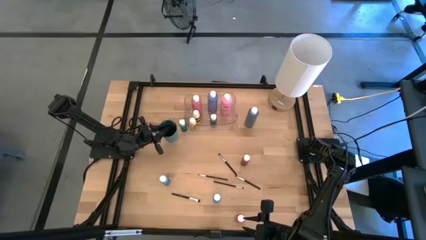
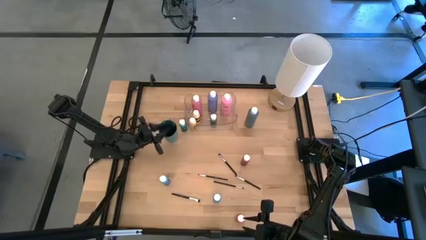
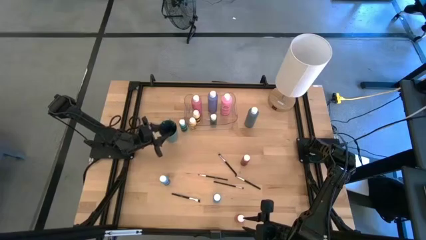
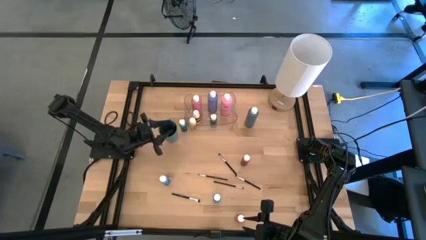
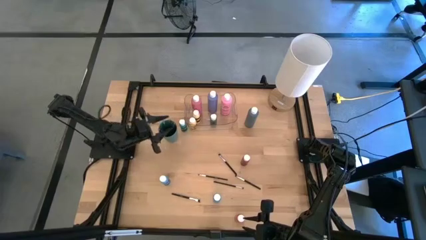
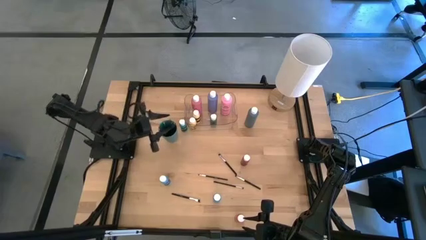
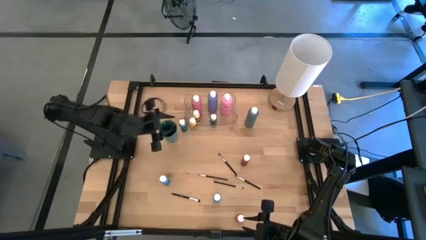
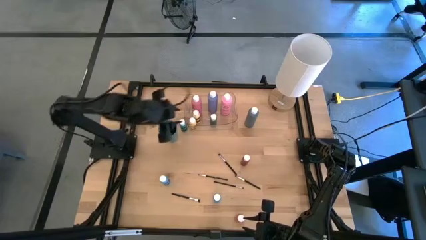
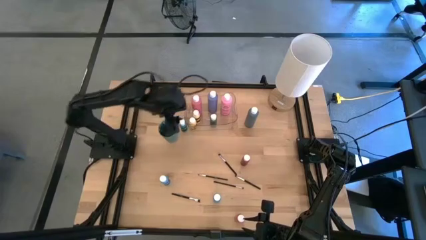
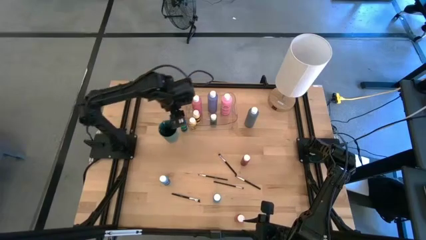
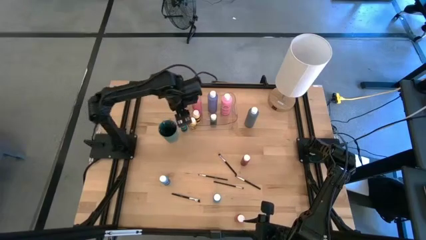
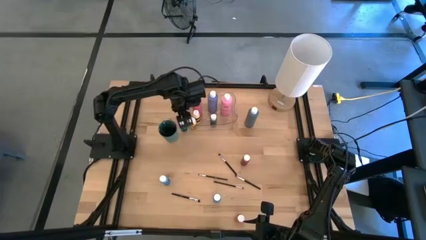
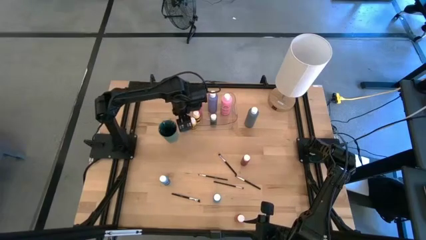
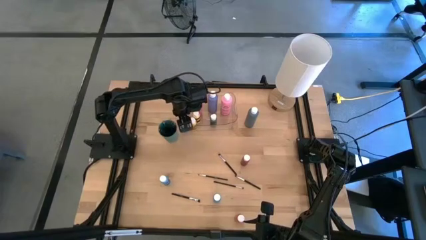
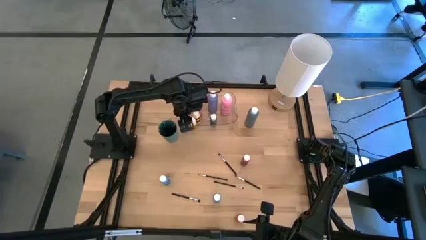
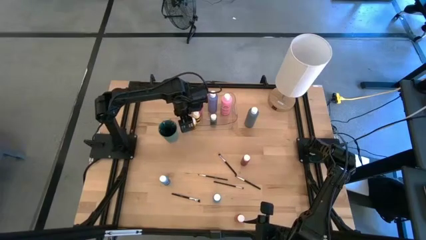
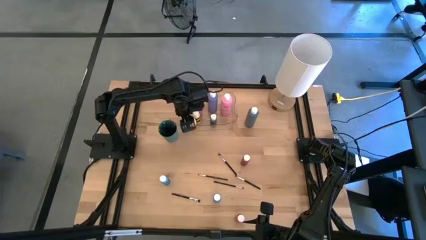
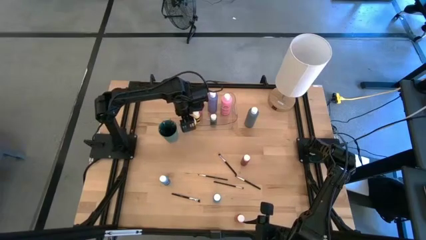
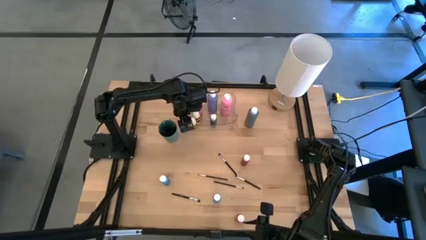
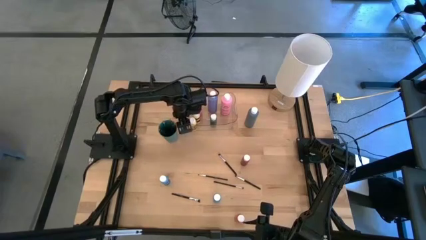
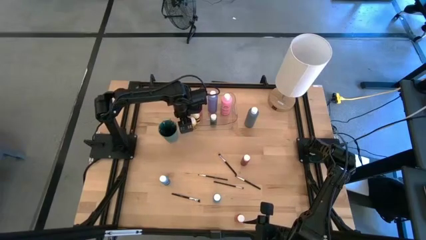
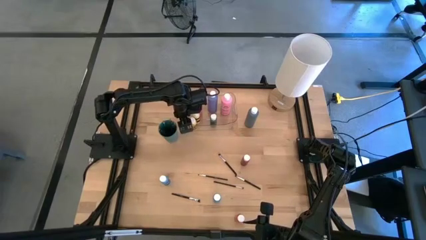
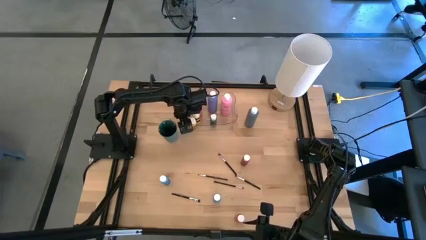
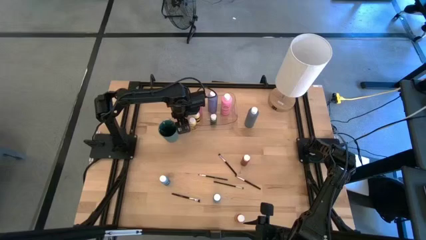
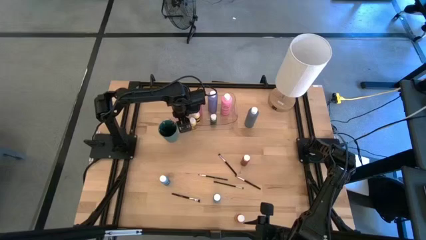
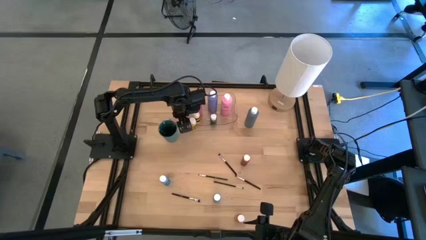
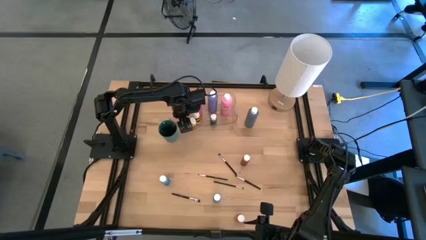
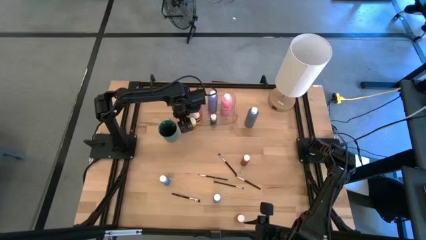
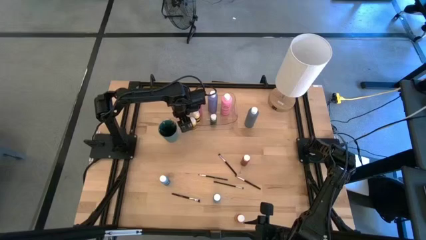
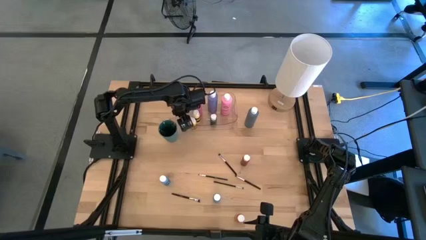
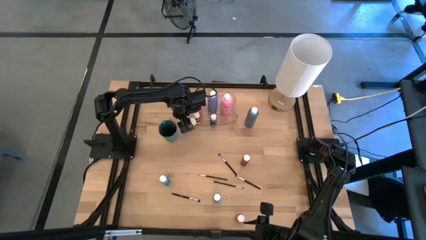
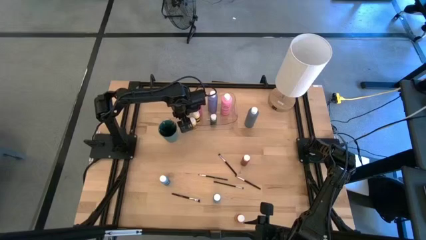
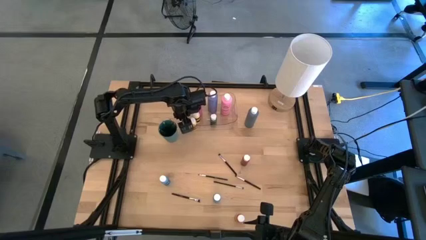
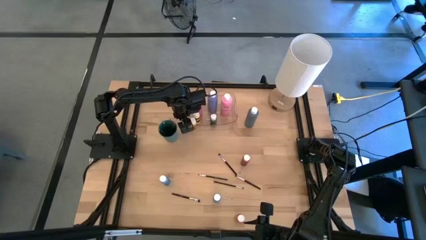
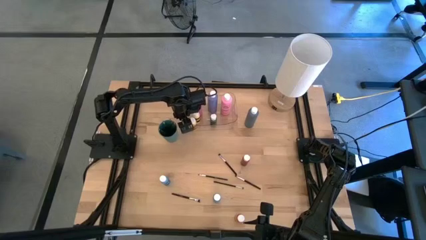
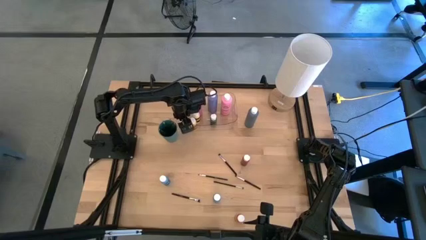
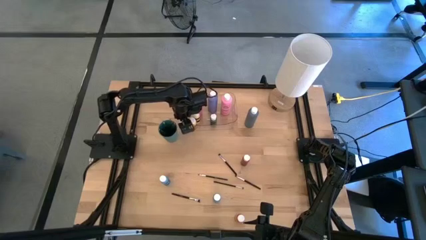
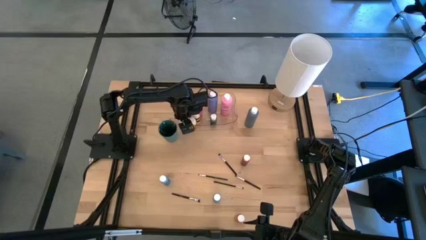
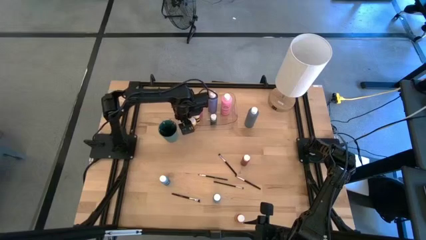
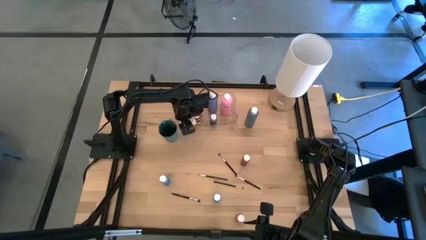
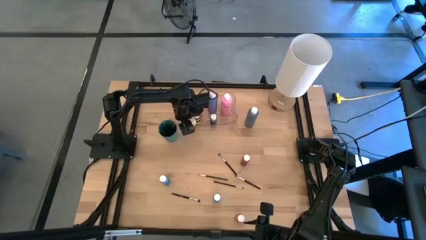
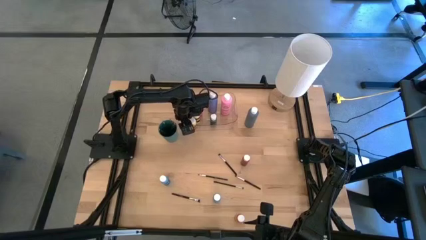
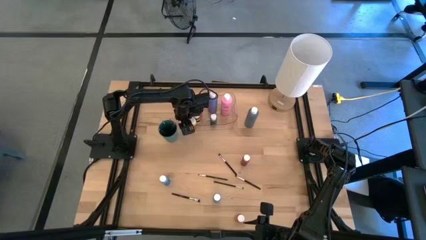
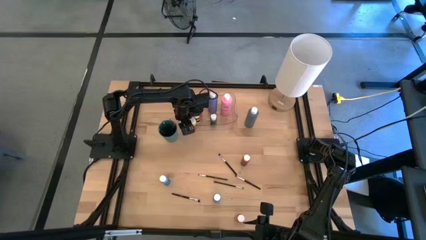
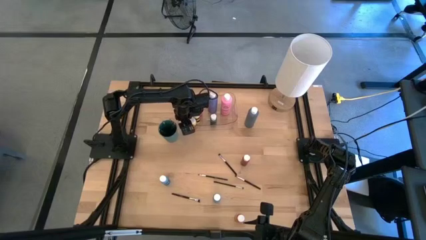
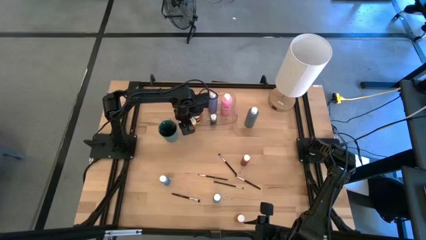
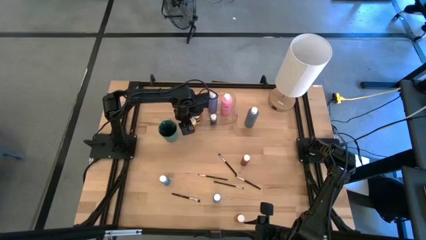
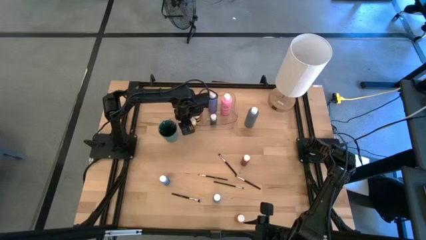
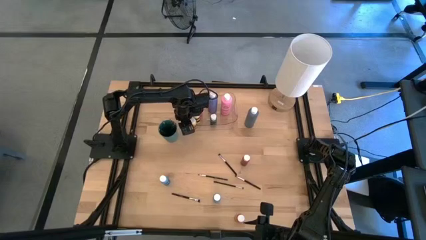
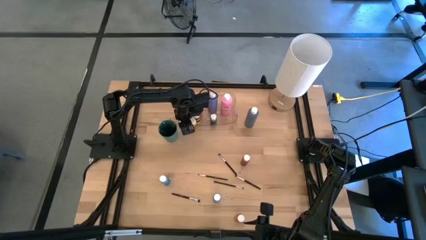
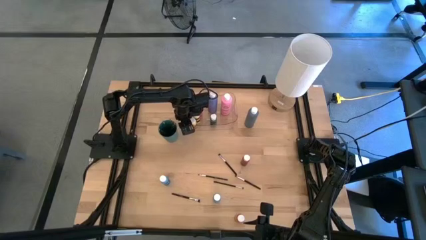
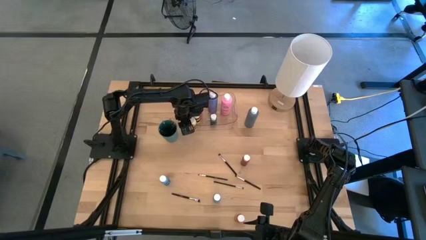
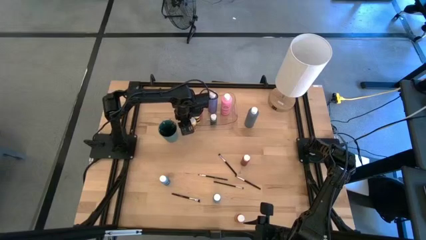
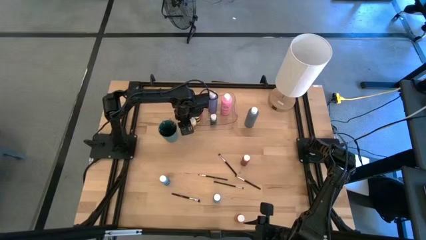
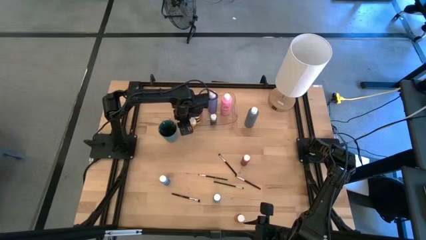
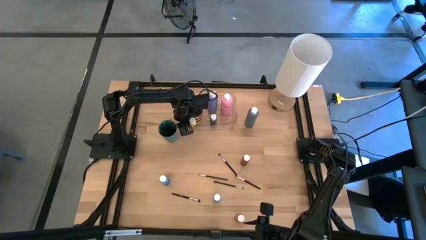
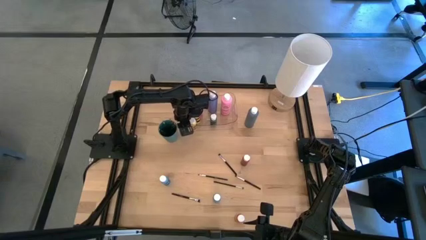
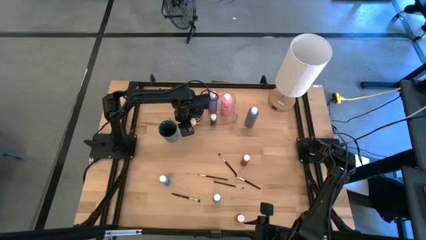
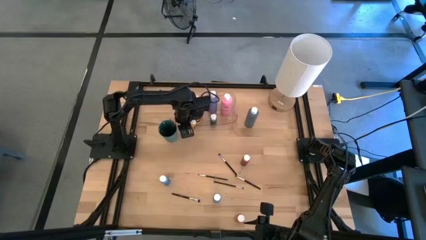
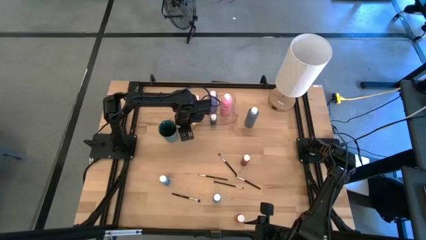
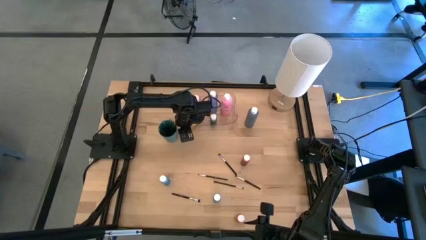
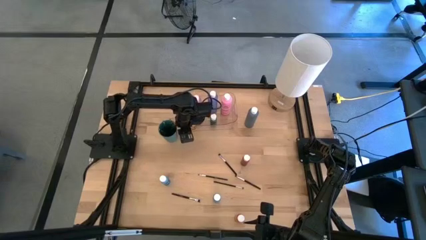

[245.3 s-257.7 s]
Task: Pick & Place Paint Supplies
Put the light blue paint bottle into the transparent bin

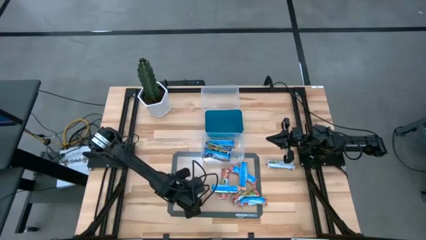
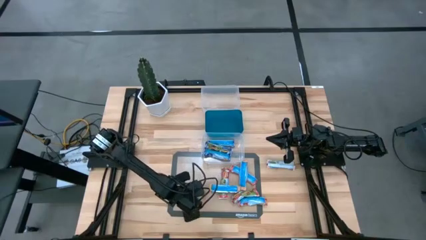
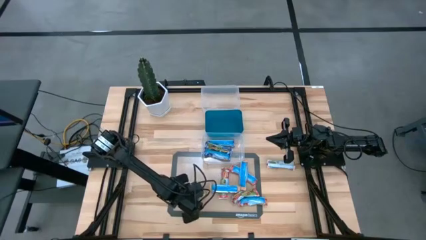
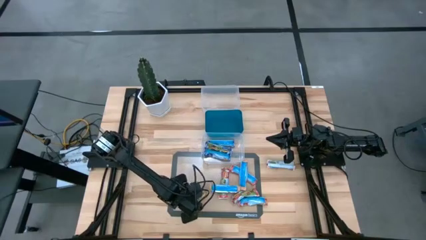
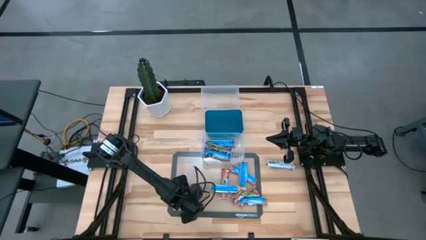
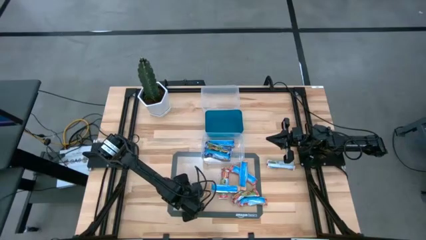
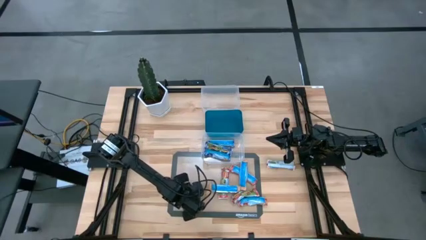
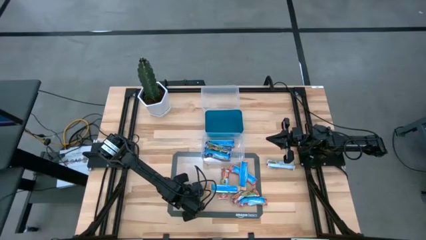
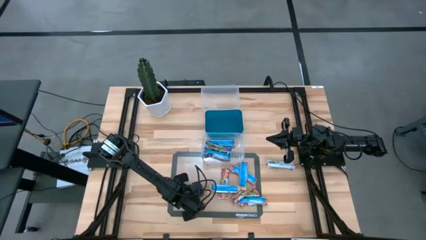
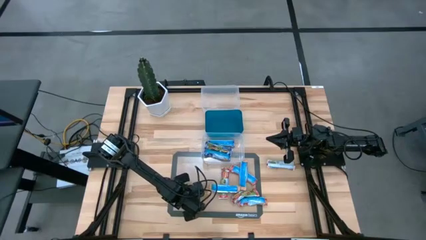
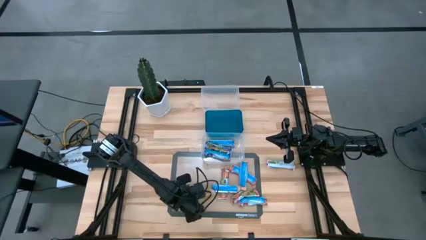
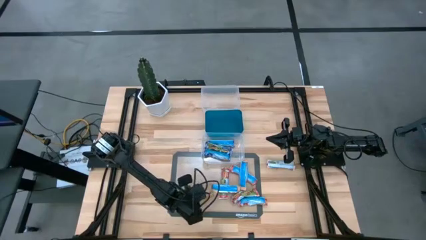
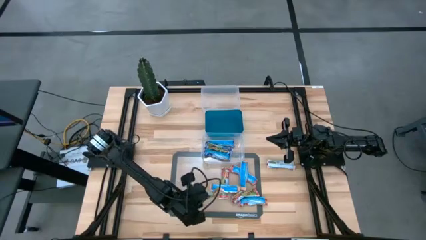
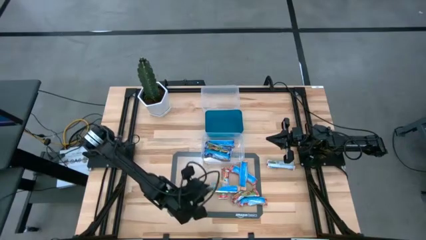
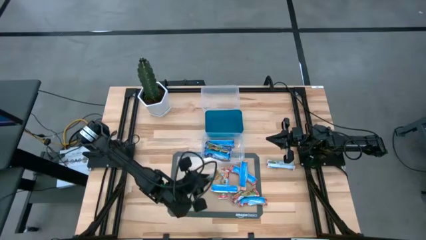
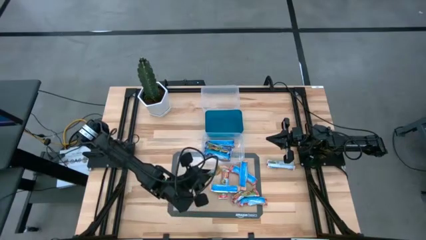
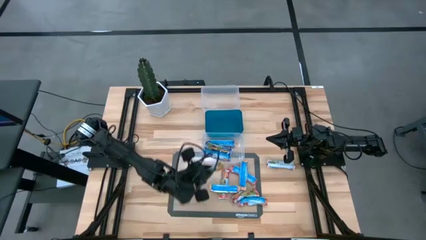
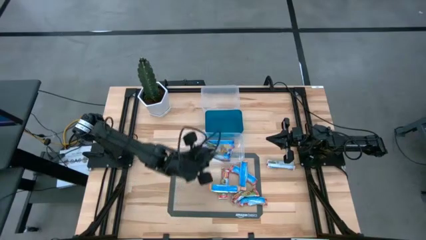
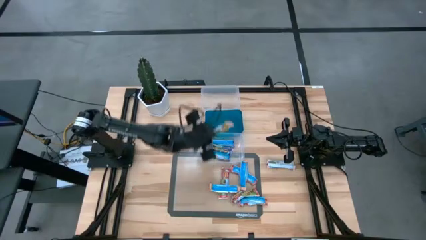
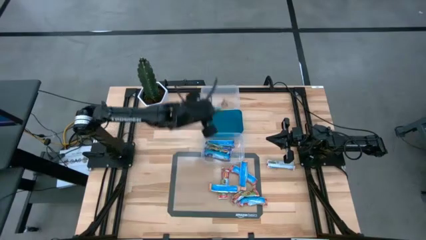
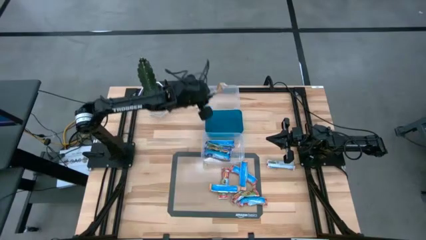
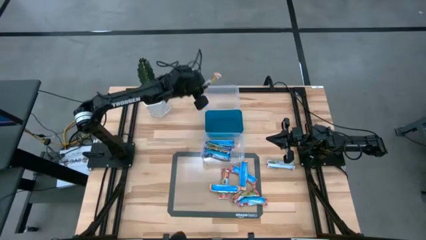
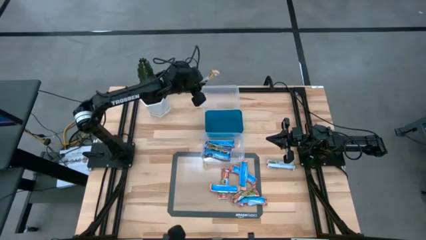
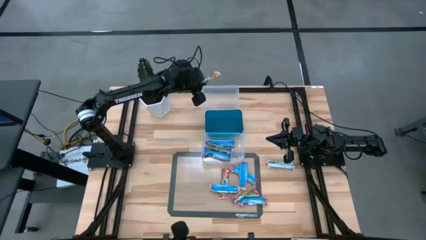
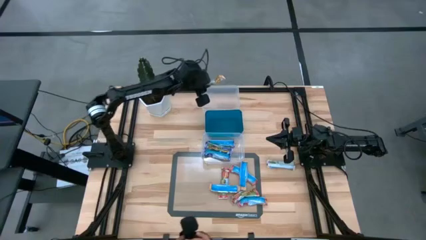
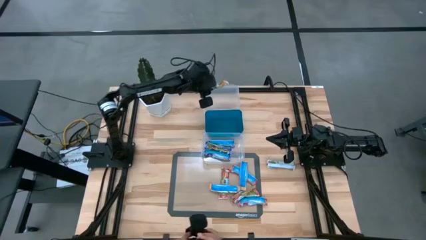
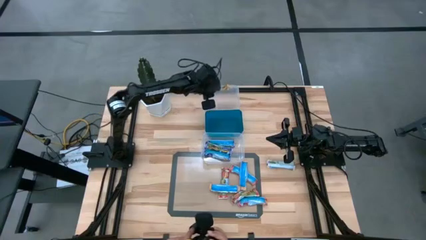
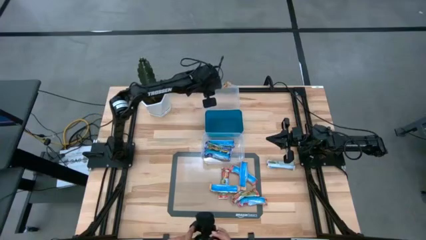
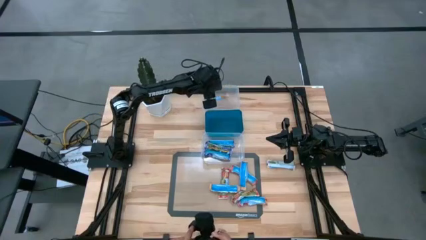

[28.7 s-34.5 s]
Task: Pick and place Granola Bars by type
Put the yellow granola bar into the top transparent bin
